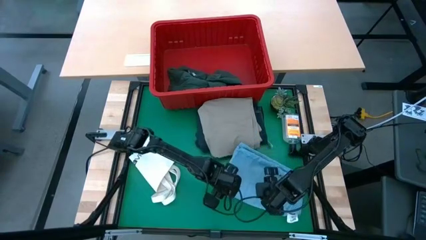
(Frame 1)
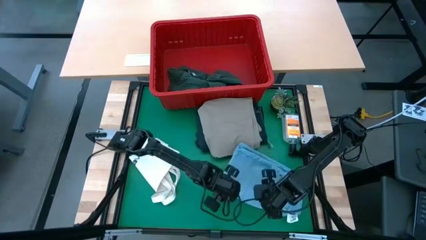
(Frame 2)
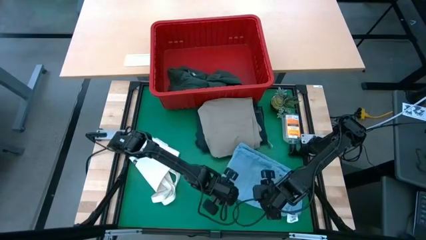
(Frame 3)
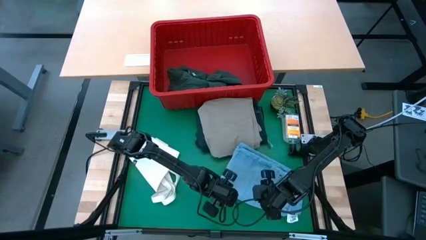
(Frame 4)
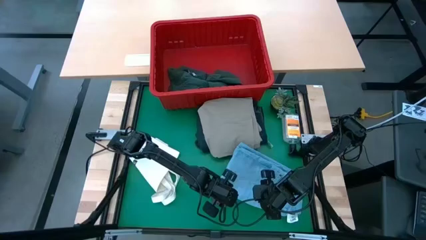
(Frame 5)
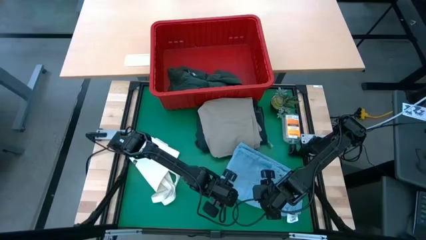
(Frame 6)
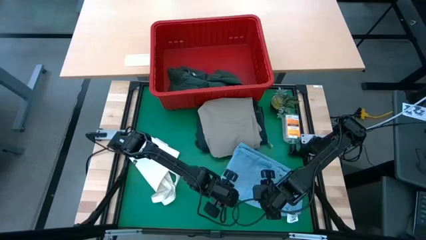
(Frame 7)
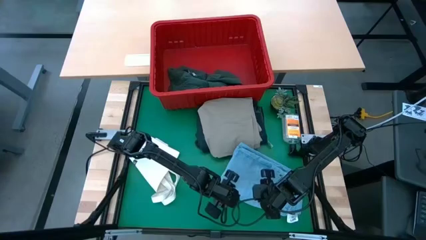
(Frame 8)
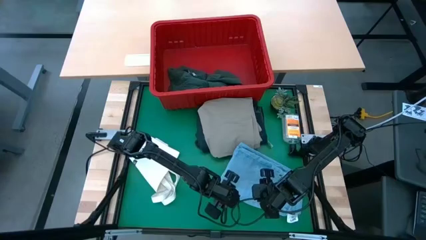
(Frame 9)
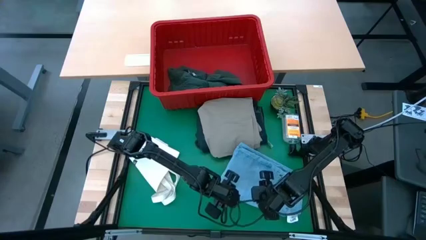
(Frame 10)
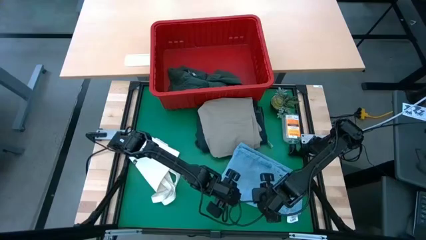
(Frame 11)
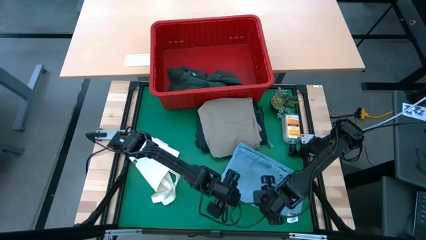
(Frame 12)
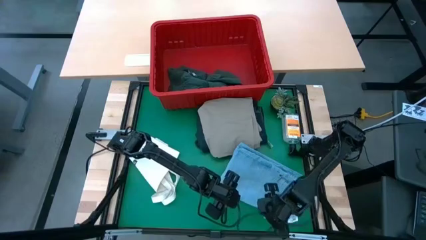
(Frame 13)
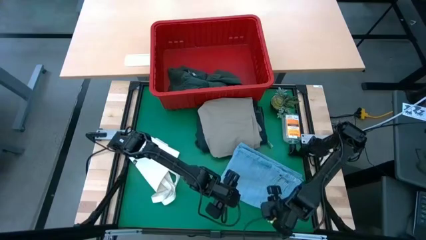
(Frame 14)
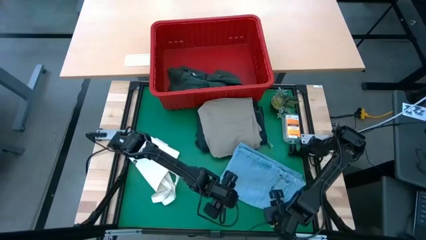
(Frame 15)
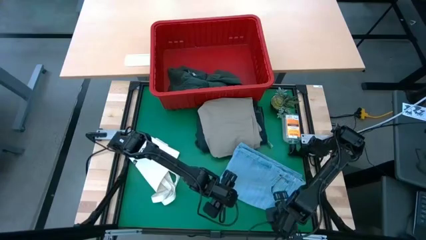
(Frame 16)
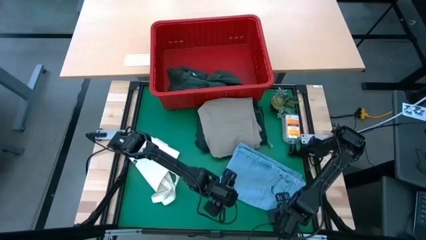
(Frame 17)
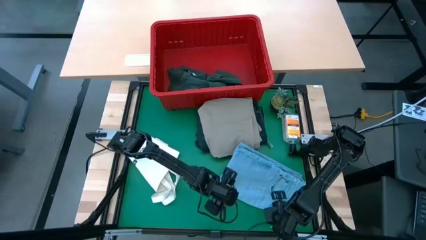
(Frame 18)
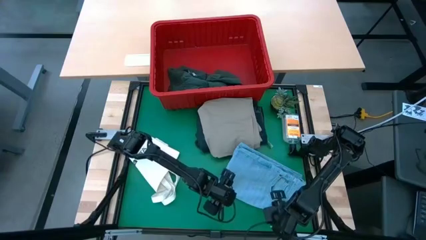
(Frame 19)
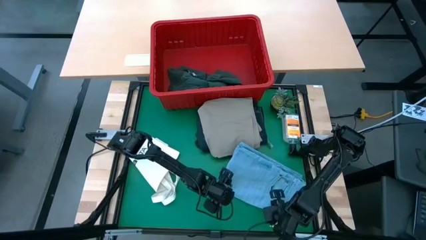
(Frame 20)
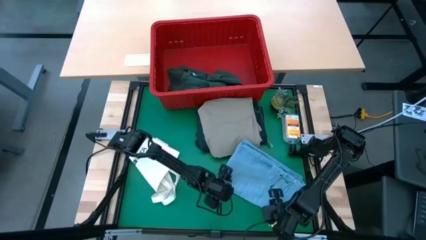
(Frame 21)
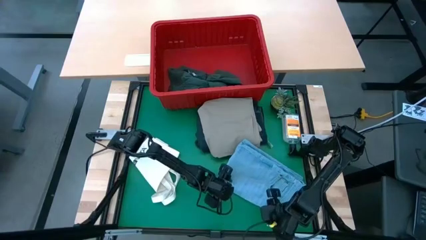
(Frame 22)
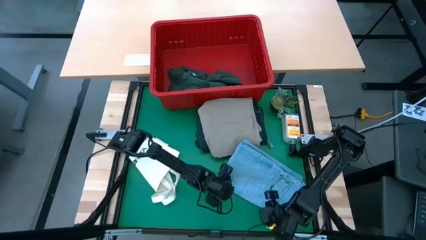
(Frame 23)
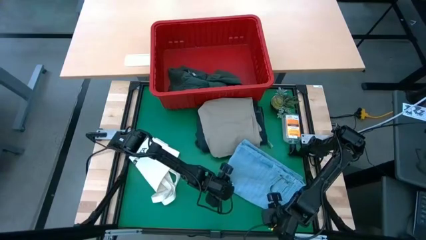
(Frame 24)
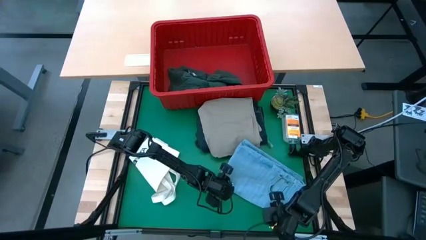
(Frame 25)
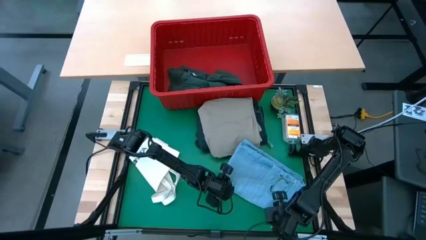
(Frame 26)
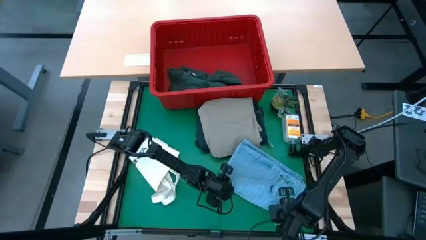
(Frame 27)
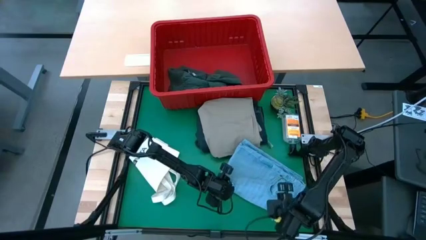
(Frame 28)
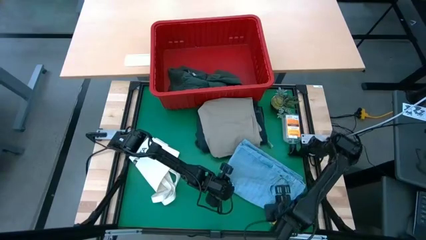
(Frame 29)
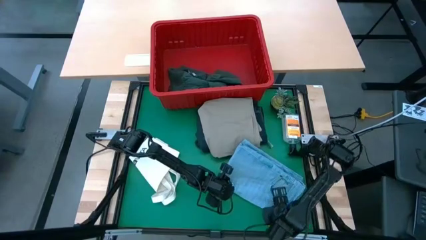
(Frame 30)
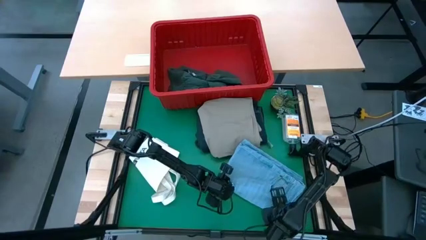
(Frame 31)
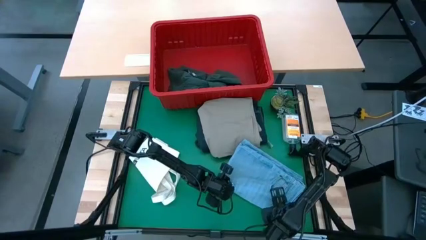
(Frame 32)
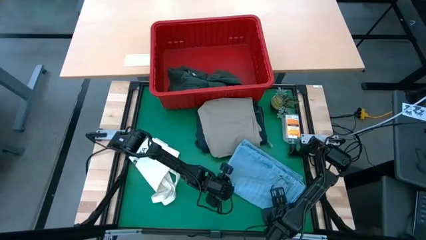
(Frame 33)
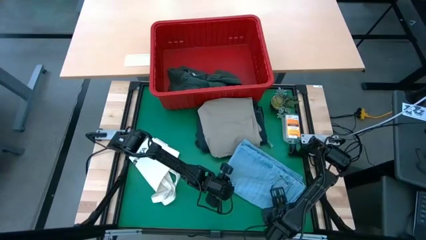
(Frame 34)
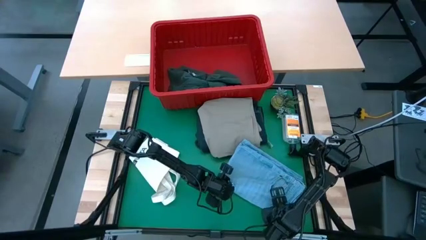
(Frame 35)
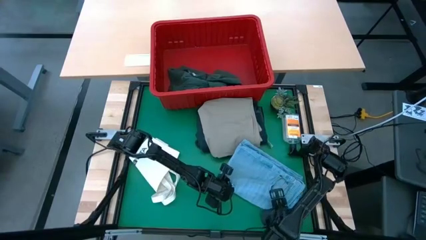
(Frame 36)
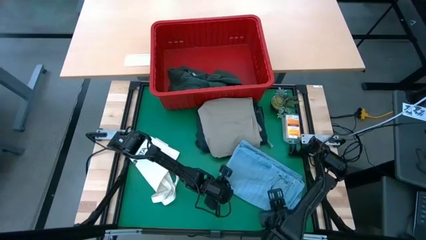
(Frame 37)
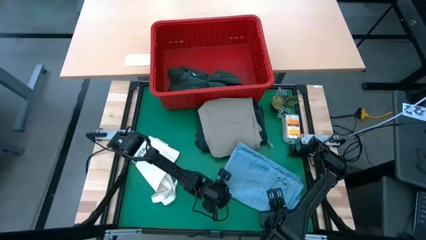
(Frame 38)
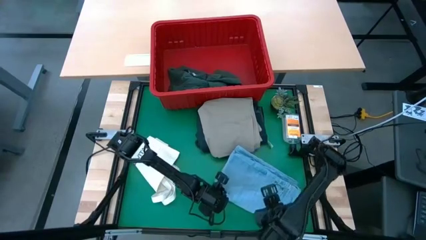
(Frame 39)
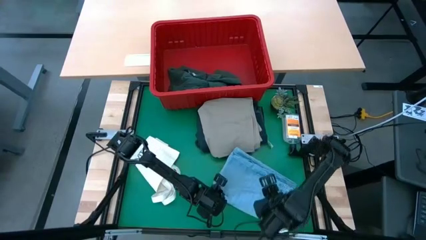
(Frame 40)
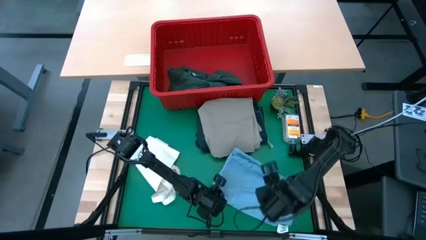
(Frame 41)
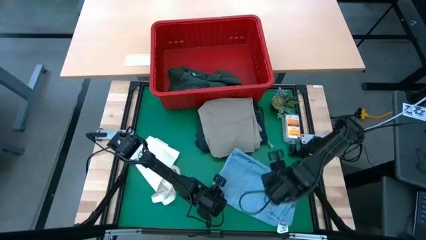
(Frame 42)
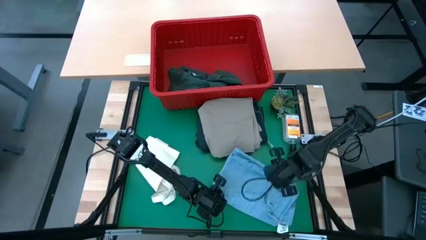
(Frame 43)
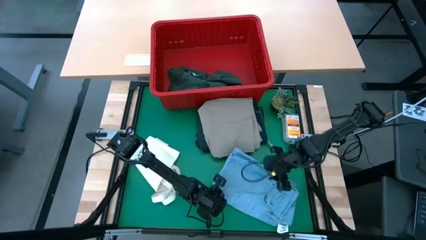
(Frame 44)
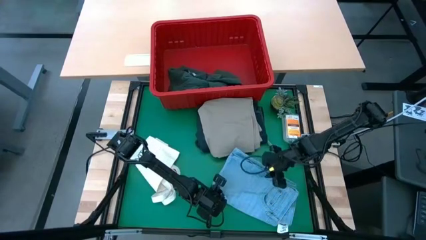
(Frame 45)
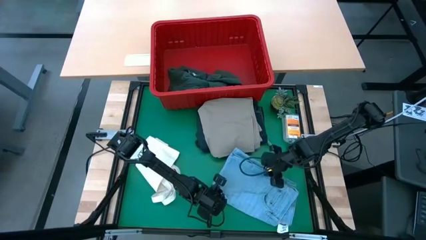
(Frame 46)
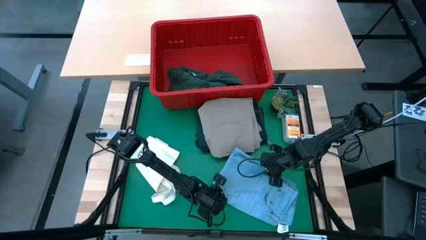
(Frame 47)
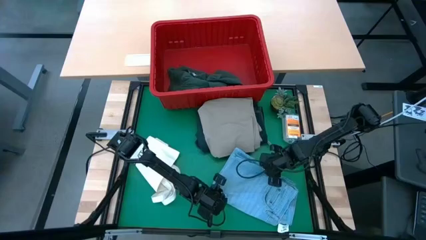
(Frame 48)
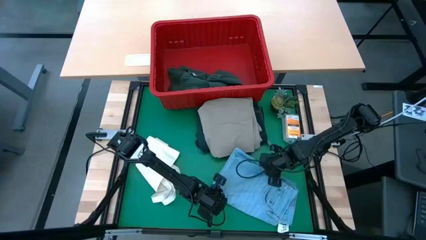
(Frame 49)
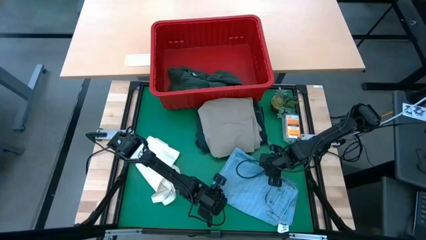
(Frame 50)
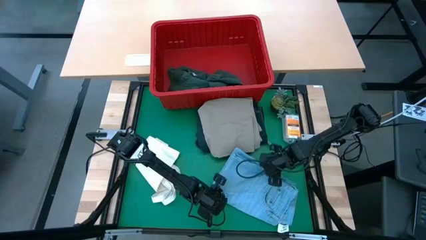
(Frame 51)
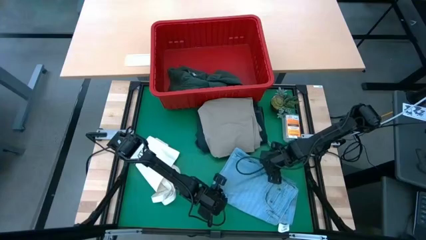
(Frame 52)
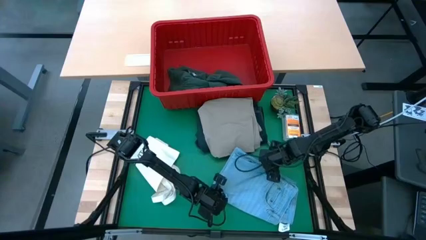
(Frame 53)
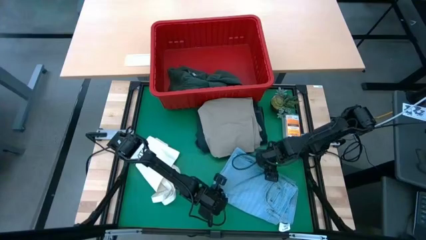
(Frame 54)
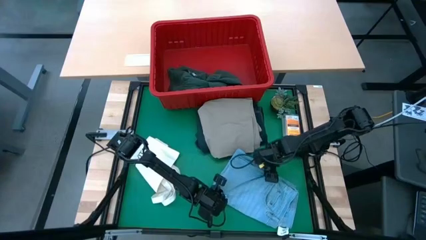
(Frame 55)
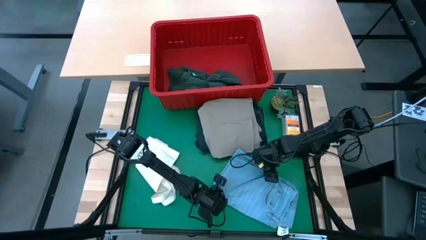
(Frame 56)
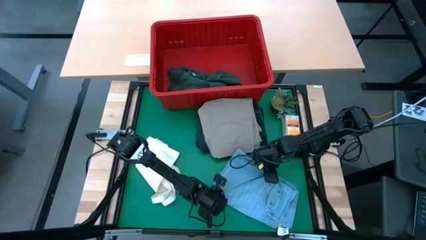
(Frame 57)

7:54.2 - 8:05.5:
Task: Fold laundry
Stack the blue pants on the brown shorts

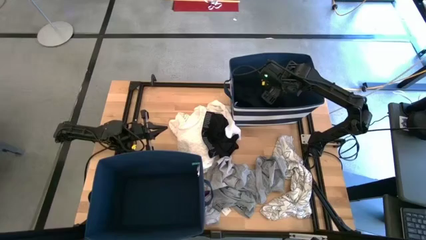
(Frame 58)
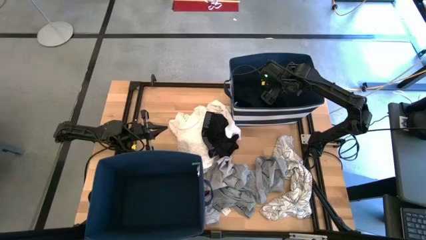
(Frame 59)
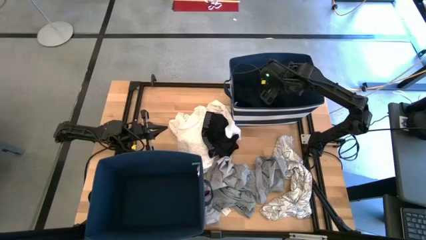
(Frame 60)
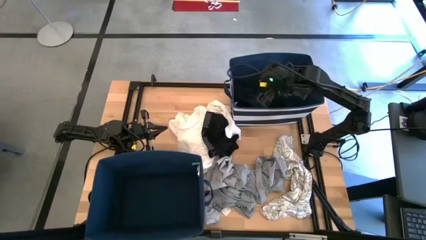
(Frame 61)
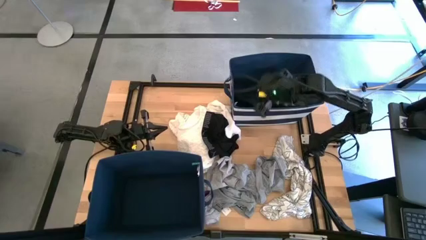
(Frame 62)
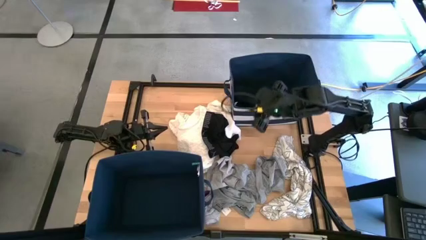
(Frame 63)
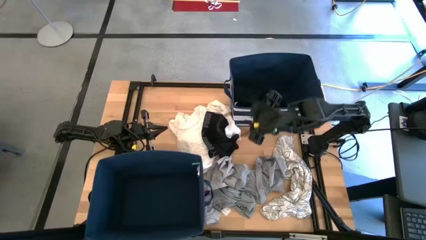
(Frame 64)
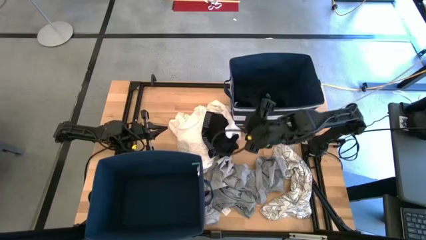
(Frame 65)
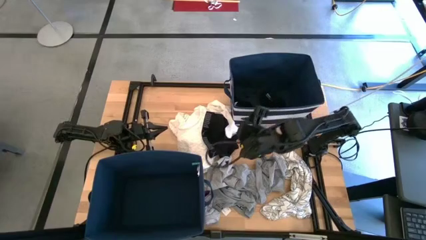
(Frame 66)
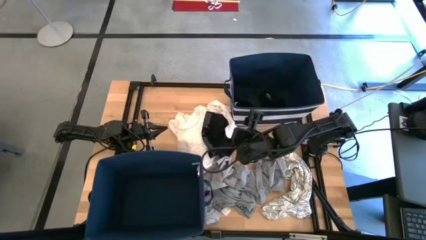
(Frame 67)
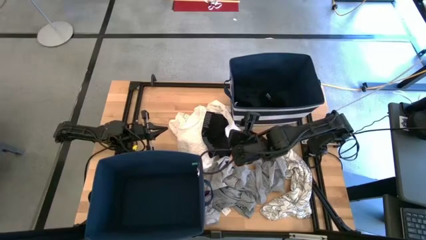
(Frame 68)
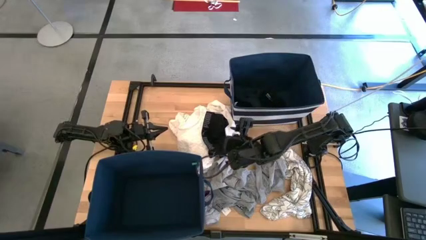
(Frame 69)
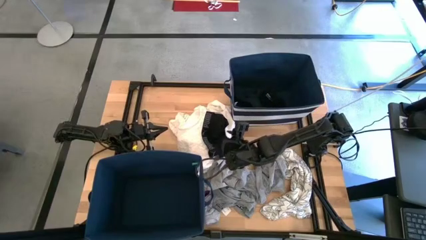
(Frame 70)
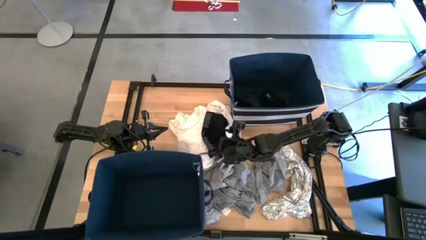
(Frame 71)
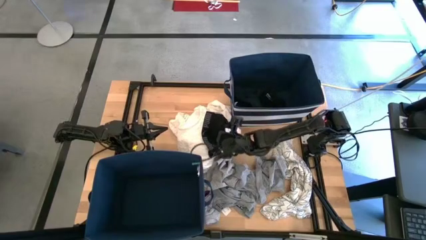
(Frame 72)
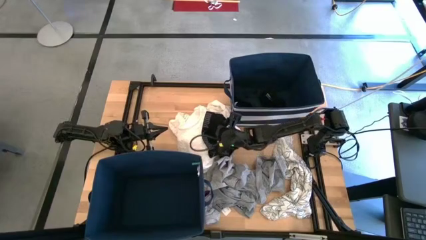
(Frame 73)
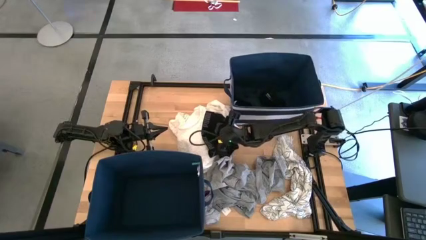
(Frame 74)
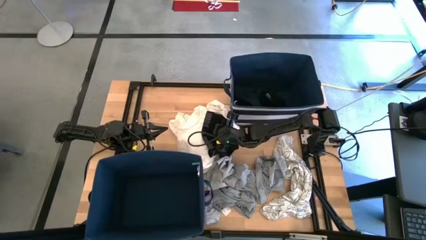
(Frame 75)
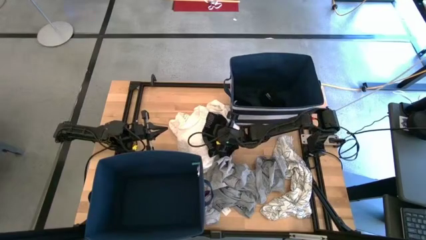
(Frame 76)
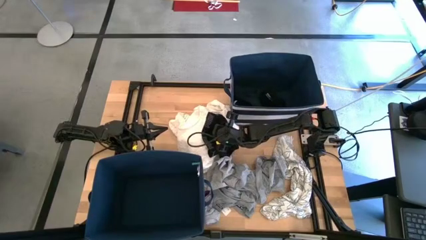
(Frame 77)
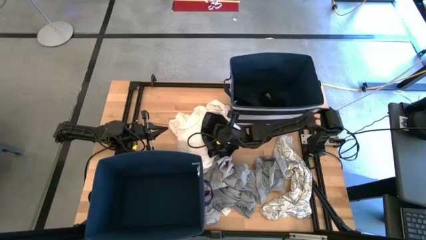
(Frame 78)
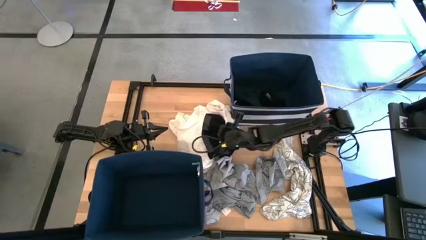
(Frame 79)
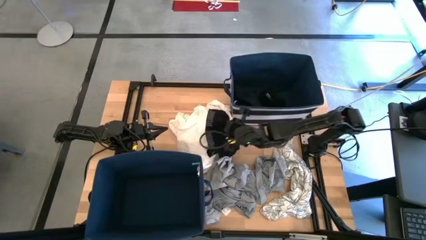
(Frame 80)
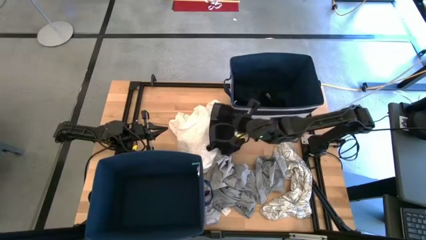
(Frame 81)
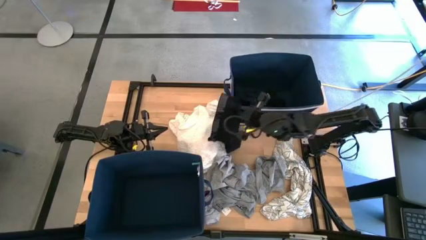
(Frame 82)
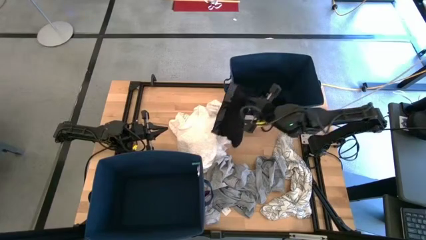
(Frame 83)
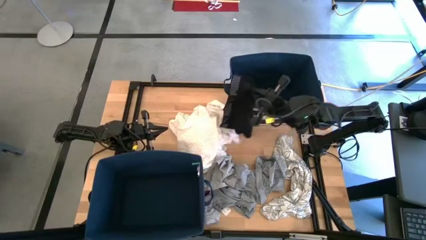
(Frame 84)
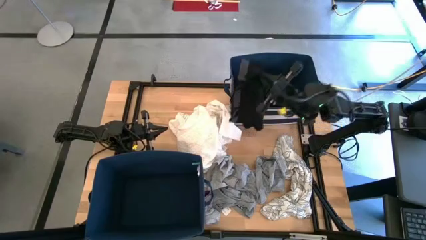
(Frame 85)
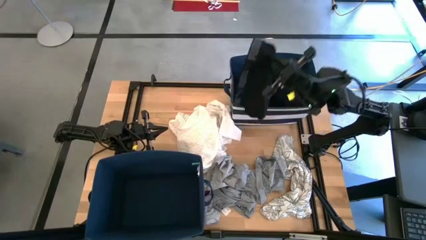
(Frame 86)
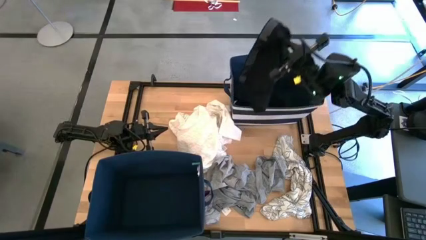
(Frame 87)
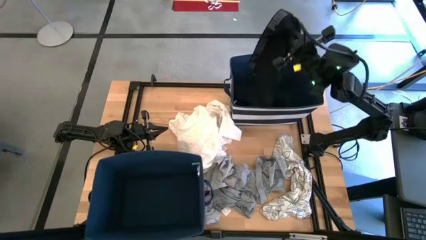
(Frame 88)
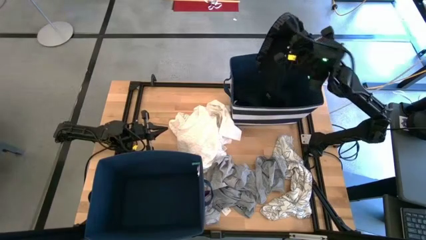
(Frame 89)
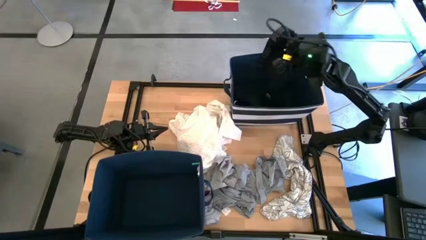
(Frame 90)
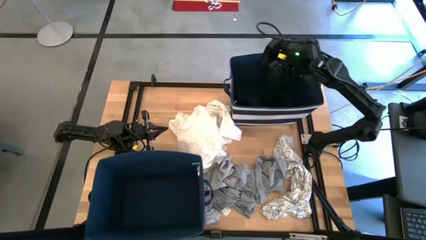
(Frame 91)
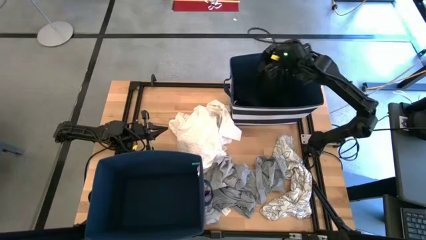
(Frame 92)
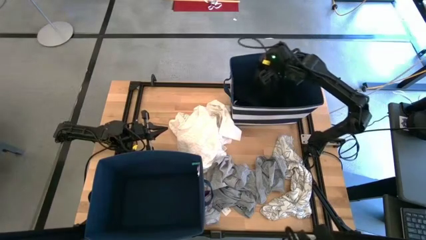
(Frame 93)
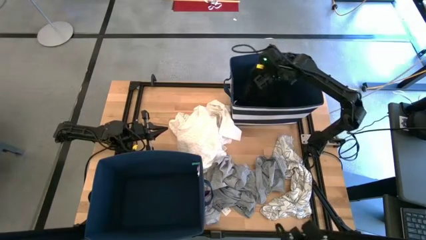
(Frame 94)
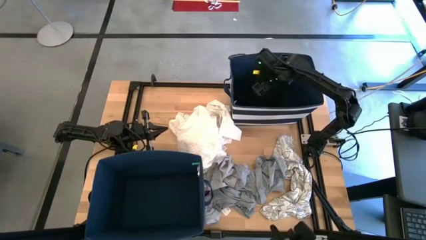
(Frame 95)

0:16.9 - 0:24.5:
Task: Sort clothes
Put the black boxer into the top right laundry bin
